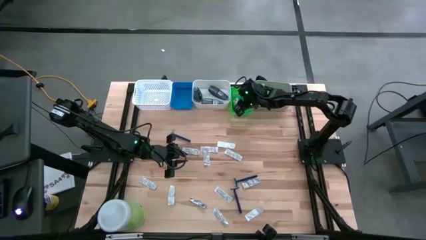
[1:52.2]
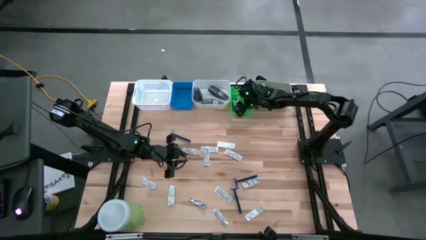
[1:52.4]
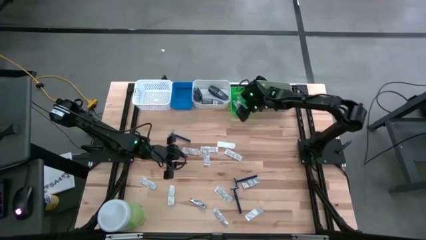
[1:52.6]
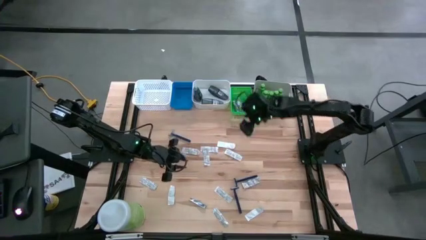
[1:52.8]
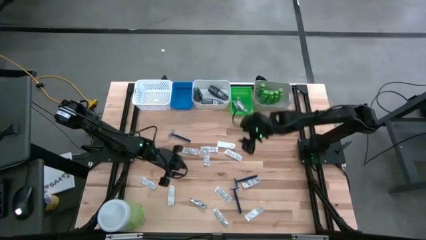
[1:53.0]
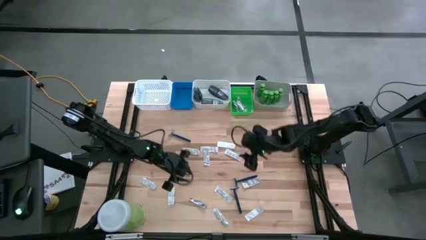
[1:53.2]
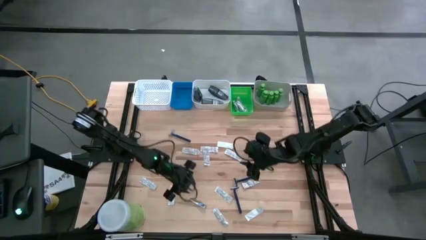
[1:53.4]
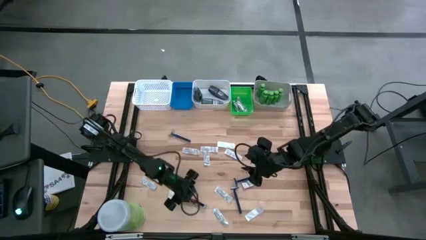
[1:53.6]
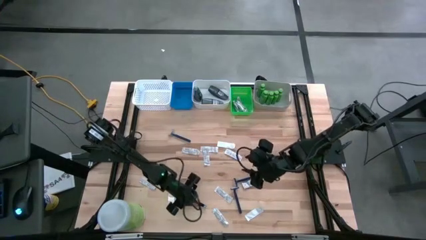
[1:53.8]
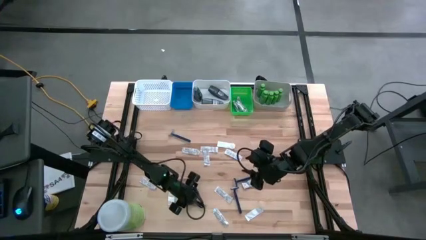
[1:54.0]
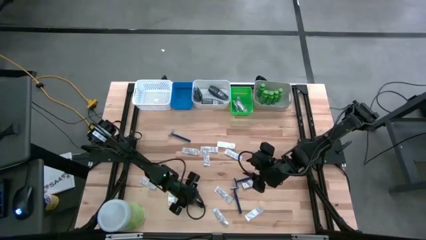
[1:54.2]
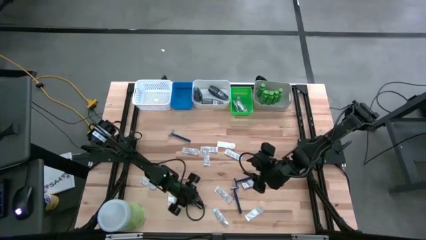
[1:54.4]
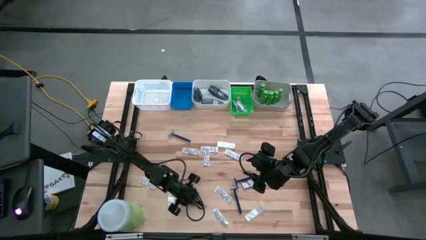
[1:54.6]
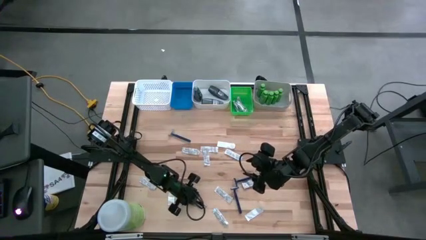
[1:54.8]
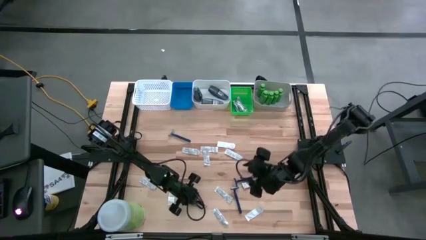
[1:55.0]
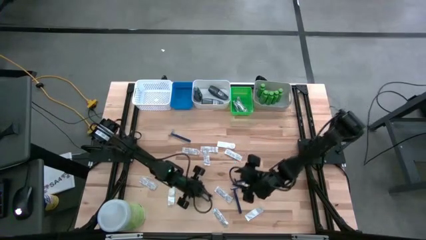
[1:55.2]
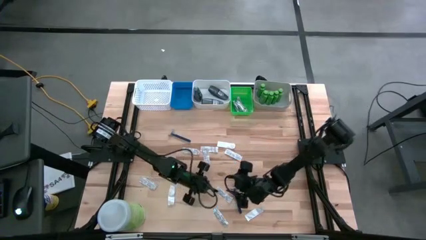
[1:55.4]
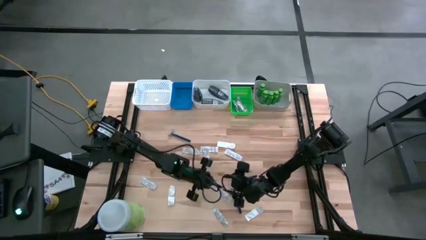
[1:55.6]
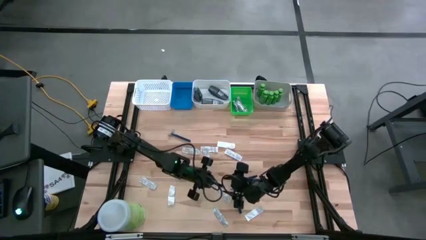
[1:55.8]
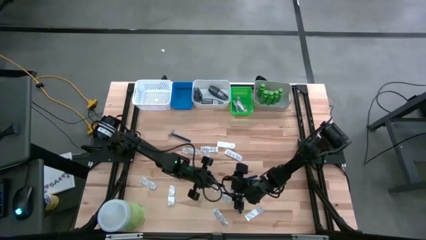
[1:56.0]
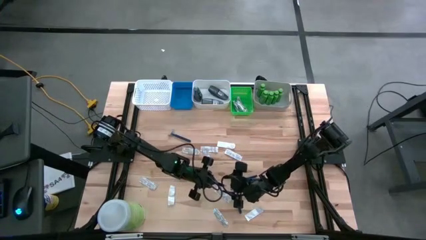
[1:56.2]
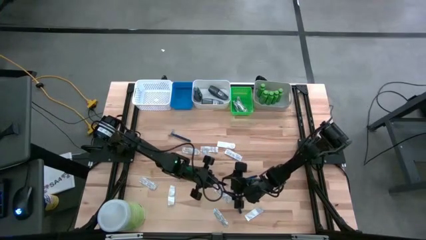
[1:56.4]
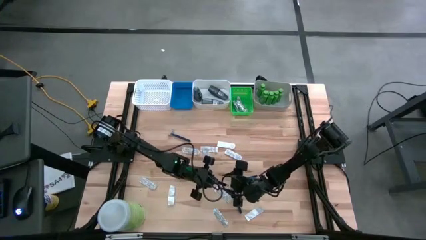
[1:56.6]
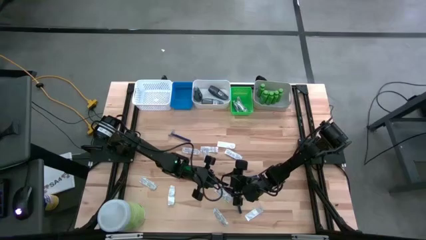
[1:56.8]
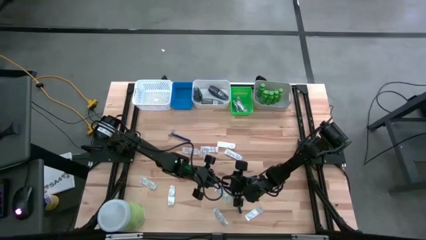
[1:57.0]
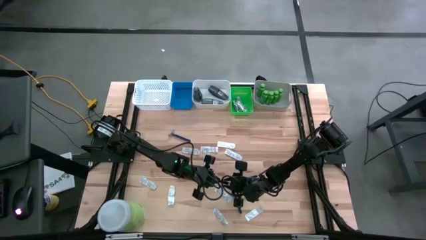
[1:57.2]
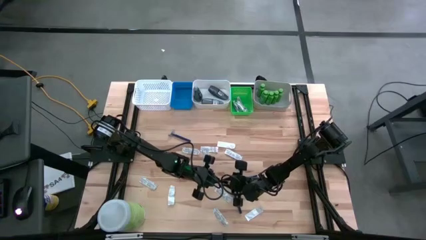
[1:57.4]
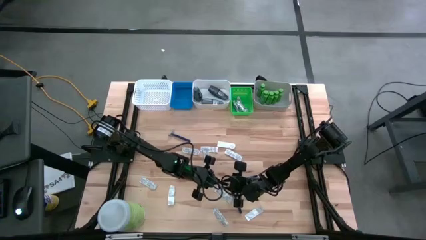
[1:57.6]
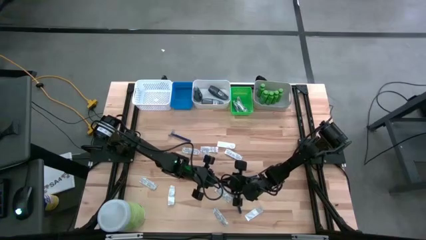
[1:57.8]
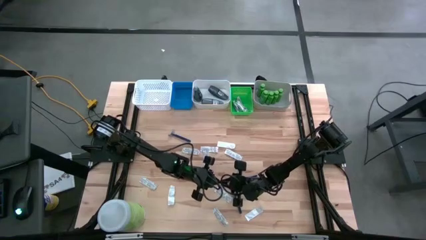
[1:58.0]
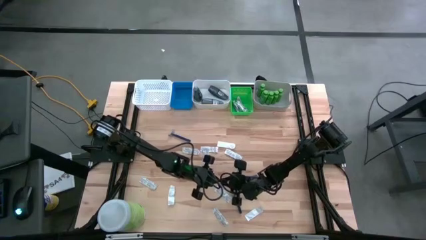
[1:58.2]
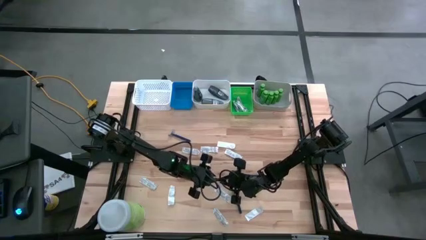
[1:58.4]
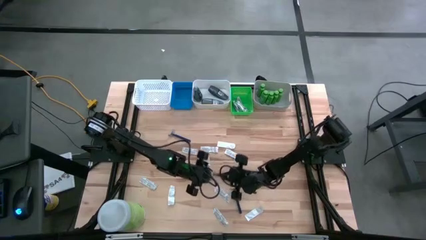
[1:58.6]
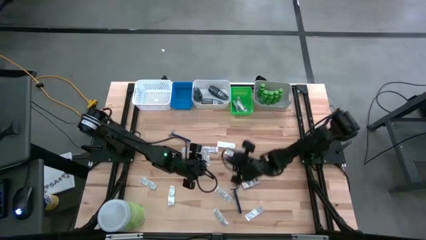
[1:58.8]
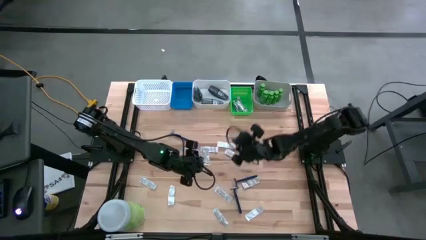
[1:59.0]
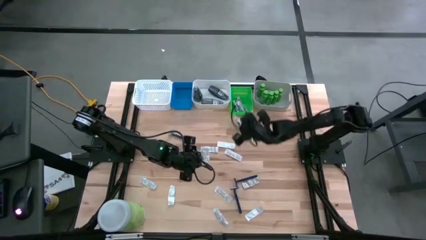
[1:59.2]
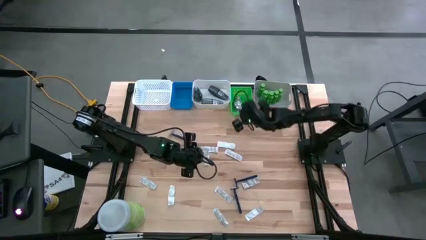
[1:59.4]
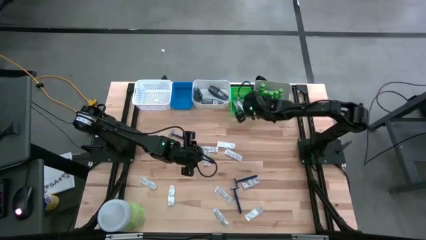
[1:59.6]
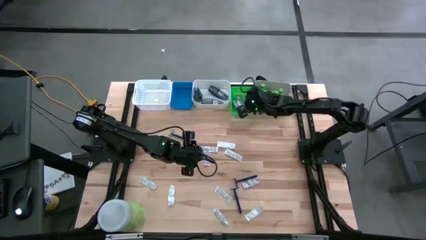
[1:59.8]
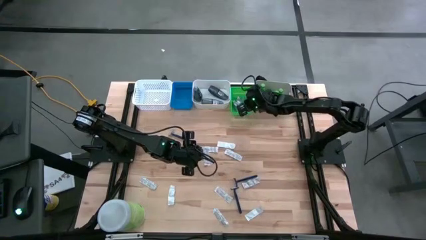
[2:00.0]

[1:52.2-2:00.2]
Task: Pick & Place Travel size toiletries
Put the nail cutter into the green bin

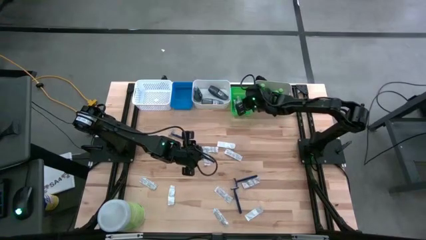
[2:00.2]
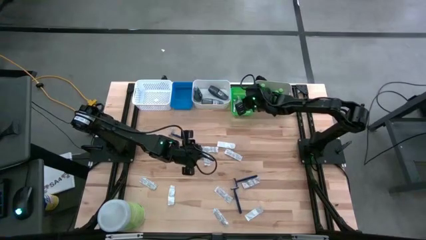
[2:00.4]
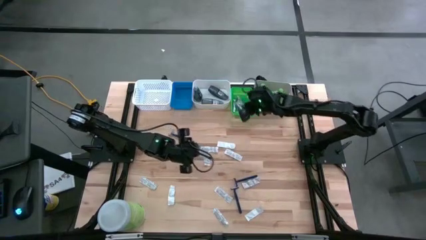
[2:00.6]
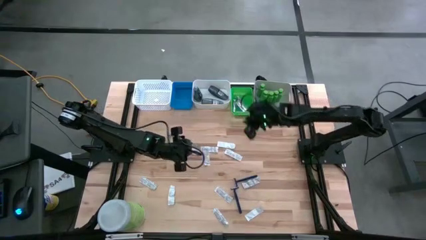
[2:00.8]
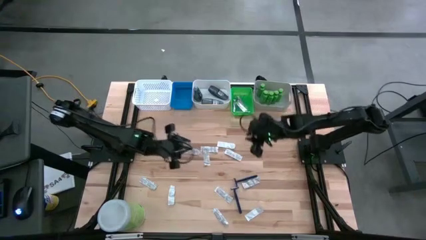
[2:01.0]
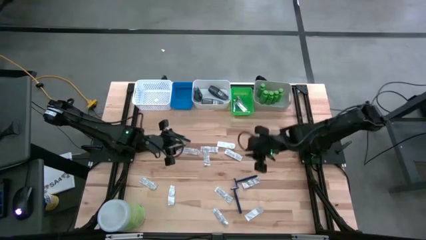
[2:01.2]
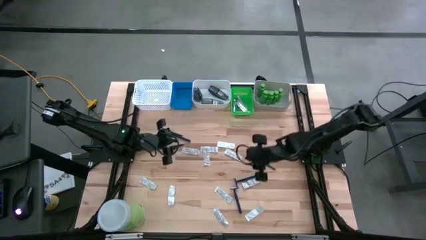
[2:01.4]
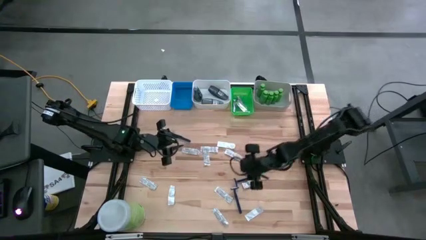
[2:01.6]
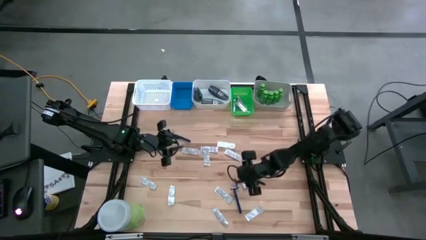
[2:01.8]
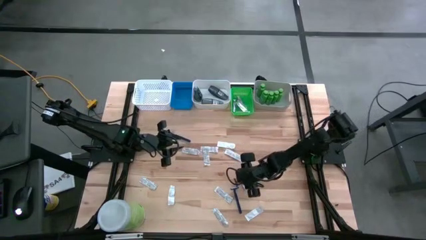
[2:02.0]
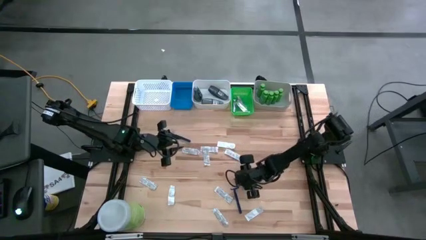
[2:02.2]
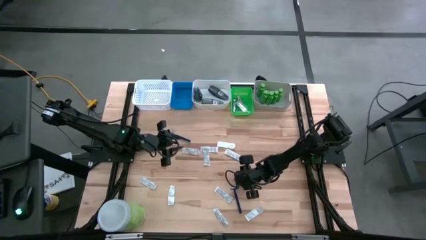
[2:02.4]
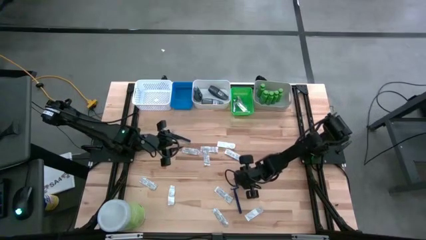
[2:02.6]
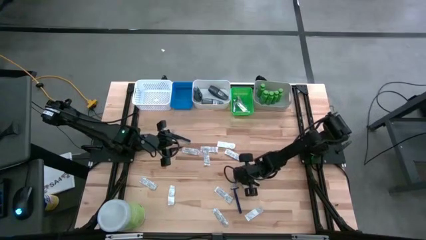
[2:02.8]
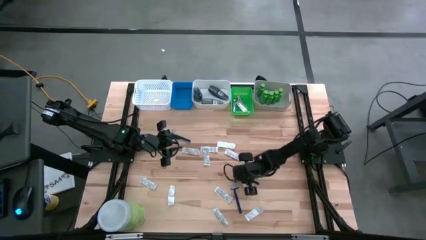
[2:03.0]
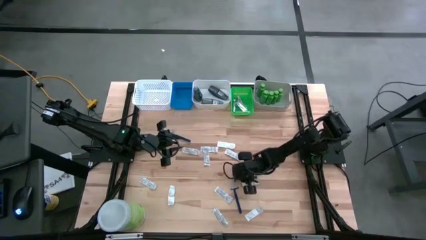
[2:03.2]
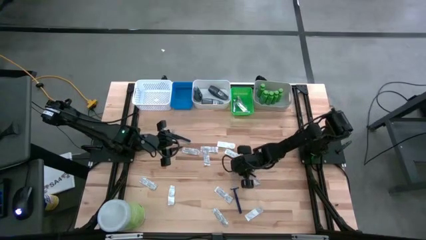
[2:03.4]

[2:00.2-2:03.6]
Put the razor into the blue bin

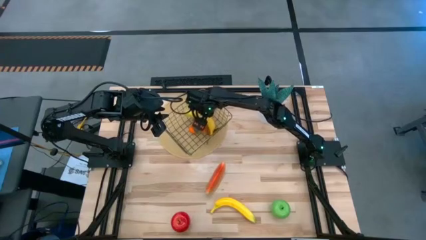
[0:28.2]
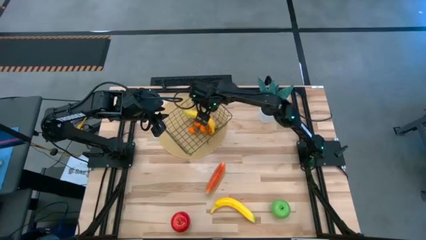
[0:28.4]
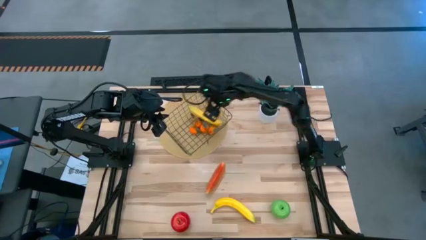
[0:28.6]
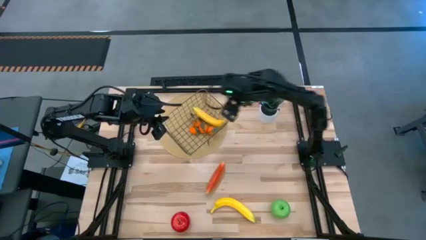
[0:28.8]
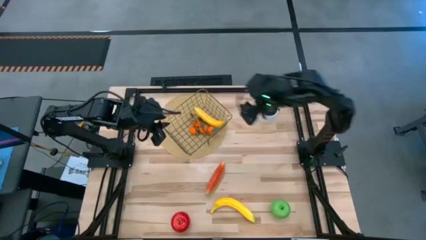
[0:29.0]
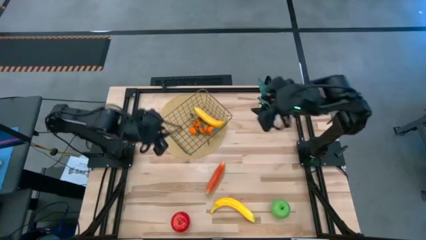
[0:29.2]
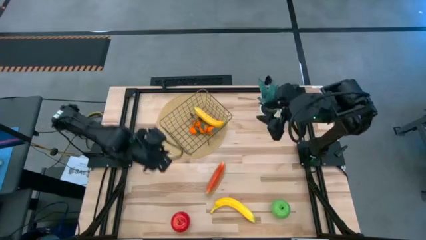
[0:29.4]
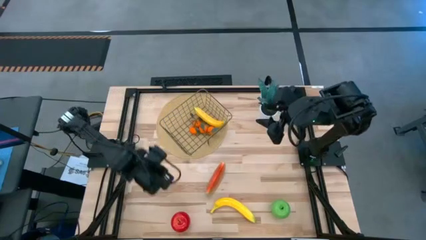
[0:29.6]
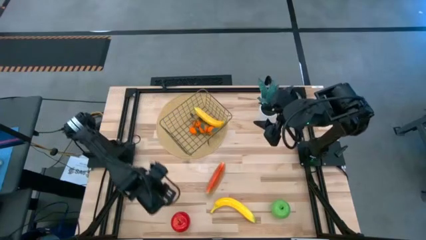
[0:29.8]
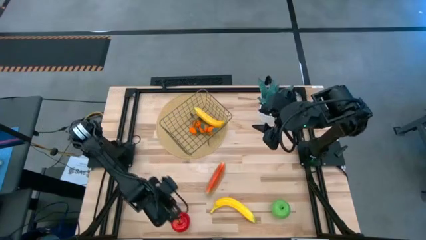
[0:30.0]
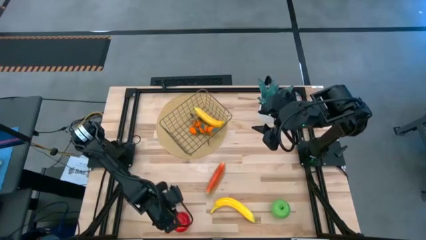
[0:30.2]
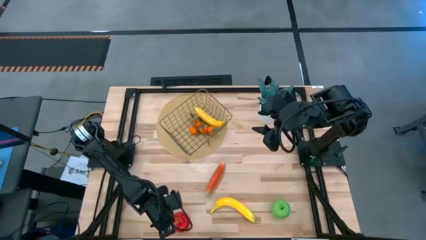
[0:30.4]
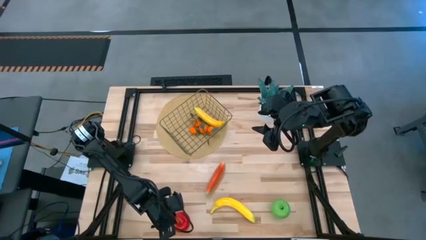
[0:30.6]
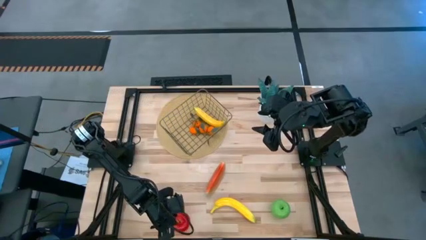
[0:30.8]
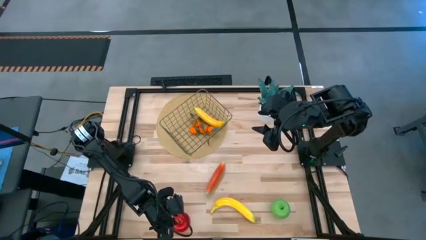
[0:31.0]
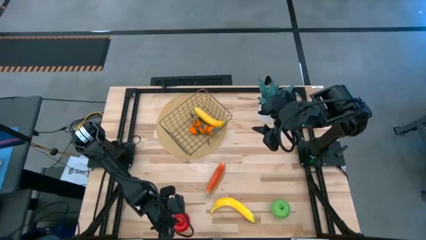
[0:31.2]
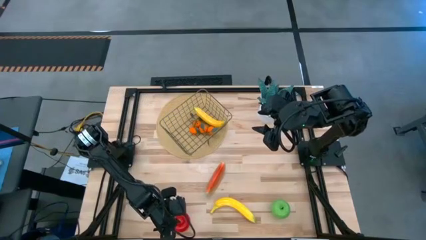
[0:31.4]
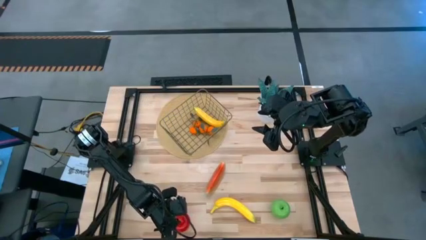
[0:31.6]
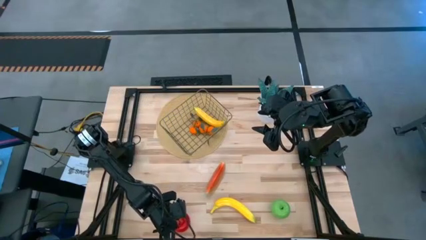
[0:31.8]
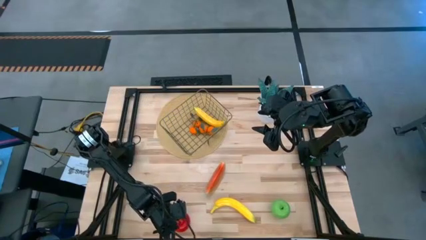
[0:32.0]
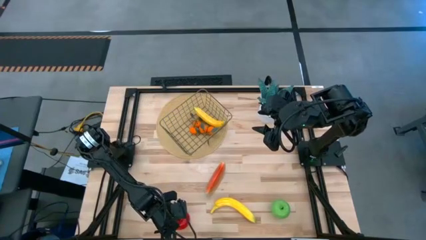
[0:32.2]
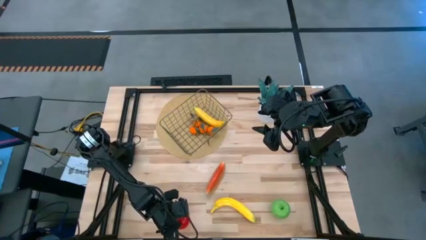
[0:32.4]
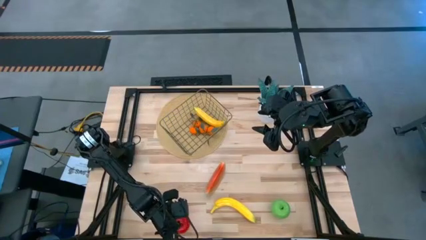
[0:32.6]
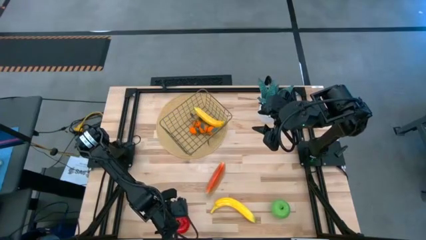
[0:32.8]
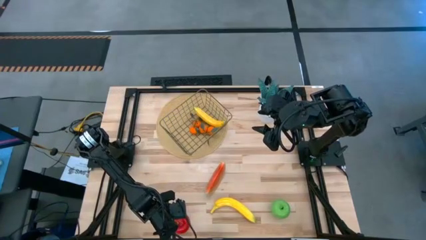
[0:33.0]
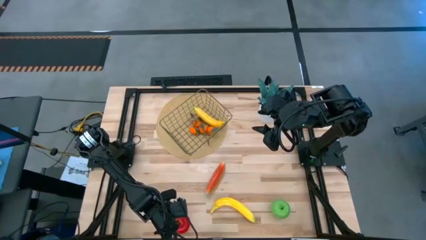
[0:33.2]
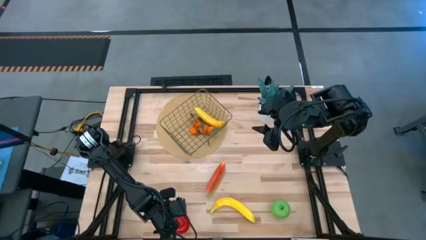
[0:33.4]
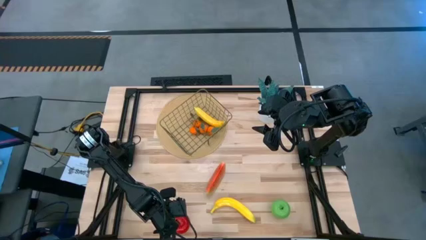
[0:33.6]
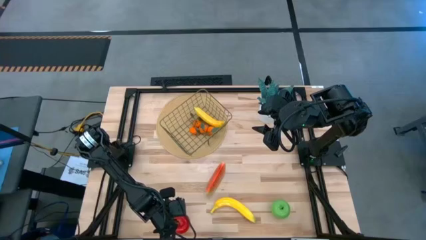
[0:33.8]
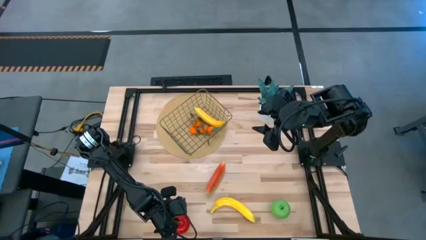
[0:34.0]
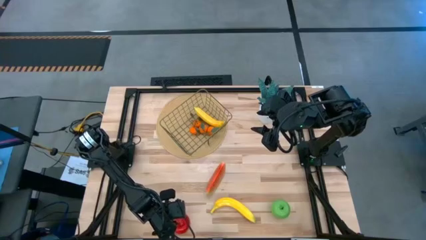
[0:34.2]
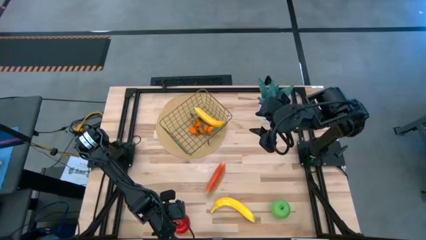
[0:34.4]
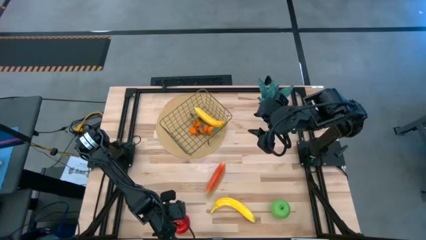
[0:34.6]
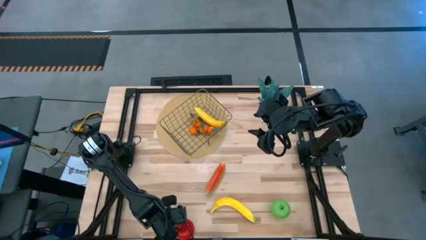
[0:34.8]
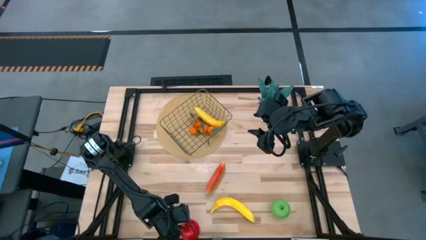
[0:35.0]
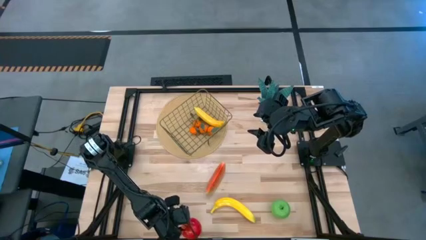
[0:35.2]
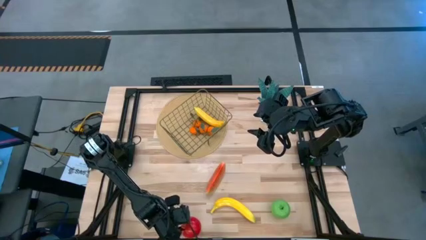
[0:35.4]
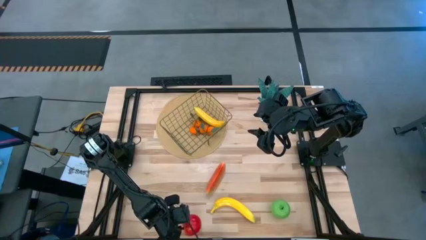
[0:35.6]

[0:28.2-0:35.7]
Task: Build produce basket
Put the red apple into the wire basket
